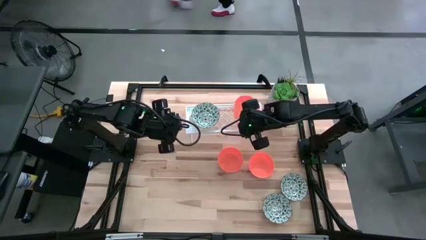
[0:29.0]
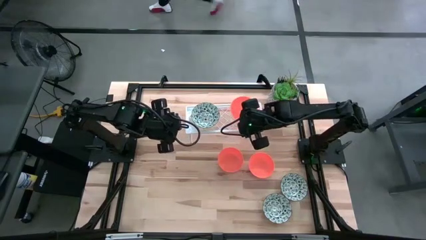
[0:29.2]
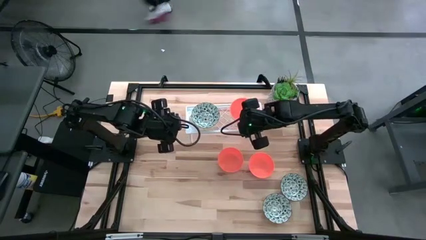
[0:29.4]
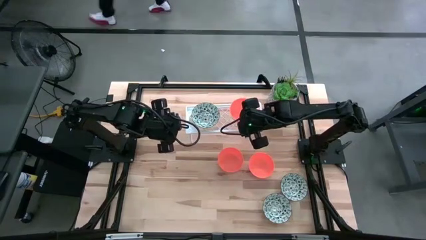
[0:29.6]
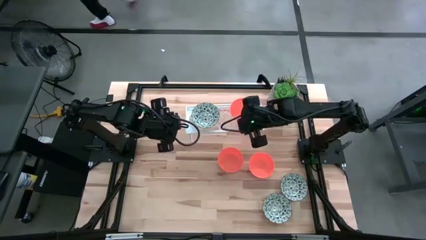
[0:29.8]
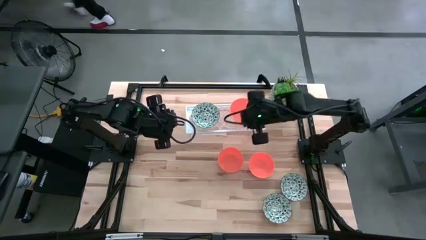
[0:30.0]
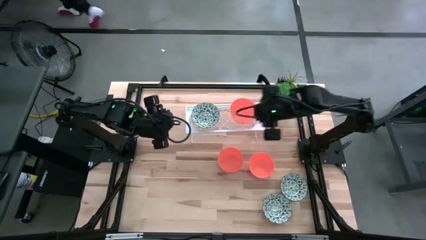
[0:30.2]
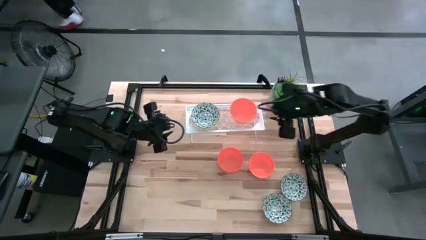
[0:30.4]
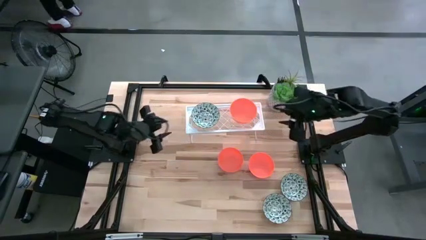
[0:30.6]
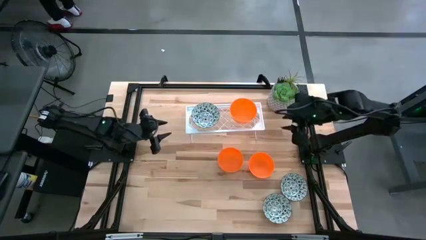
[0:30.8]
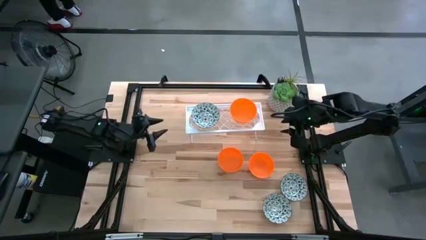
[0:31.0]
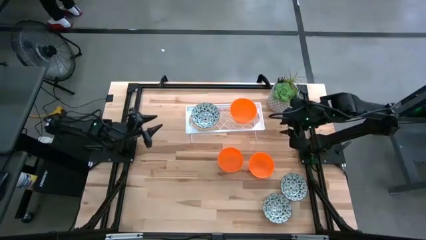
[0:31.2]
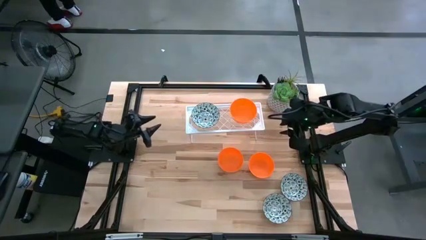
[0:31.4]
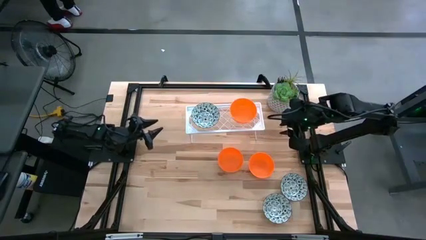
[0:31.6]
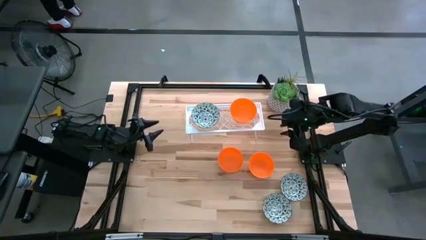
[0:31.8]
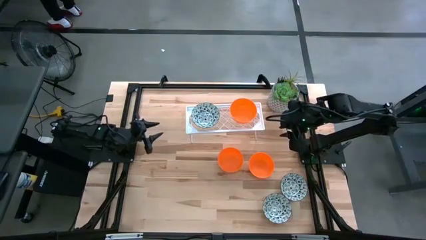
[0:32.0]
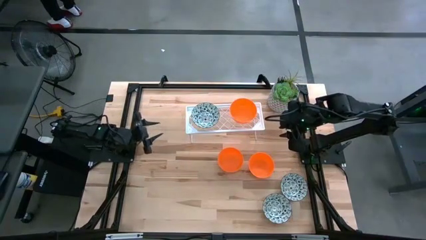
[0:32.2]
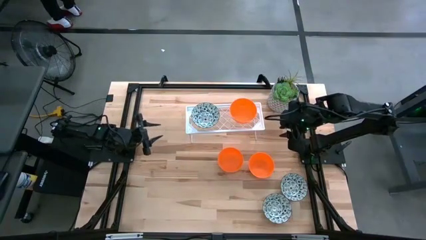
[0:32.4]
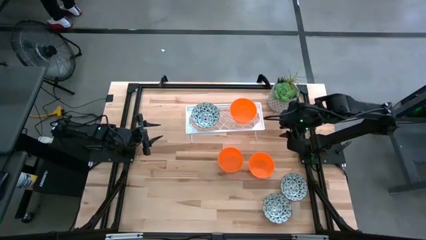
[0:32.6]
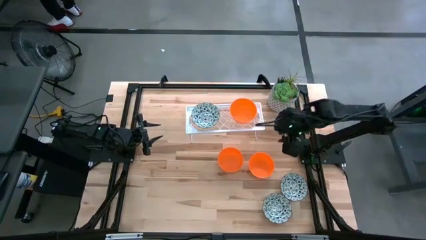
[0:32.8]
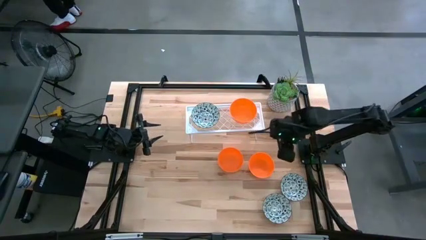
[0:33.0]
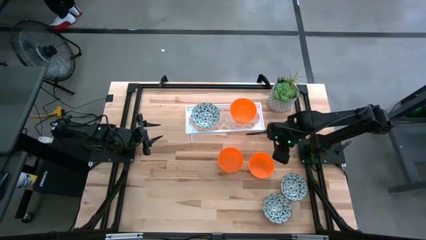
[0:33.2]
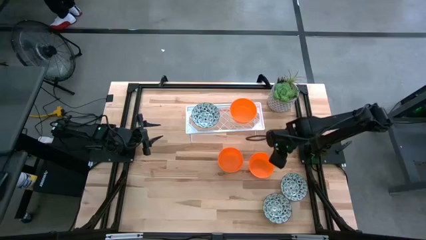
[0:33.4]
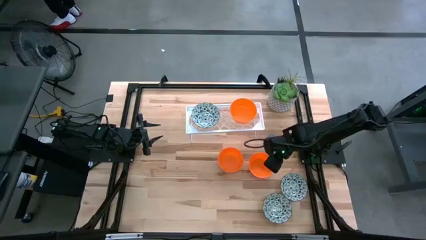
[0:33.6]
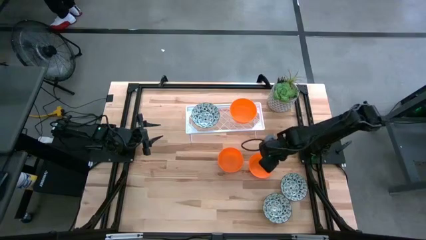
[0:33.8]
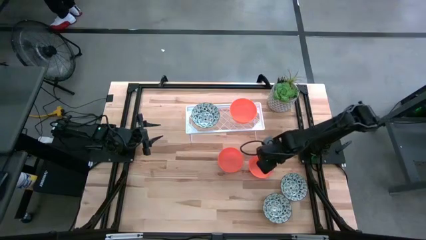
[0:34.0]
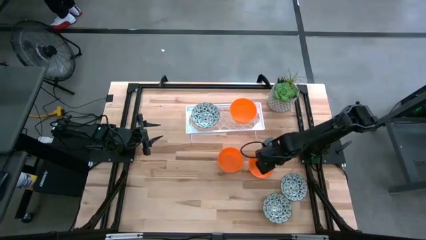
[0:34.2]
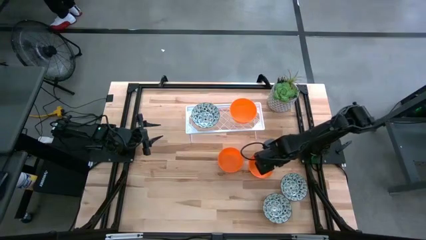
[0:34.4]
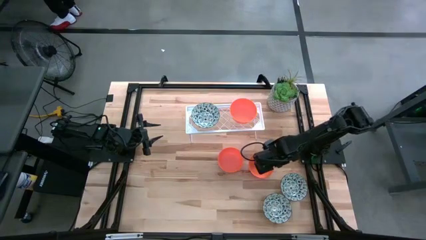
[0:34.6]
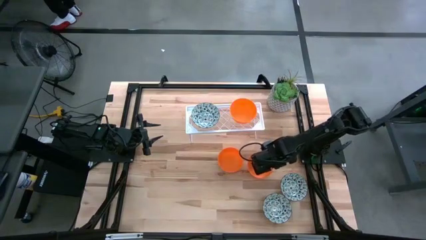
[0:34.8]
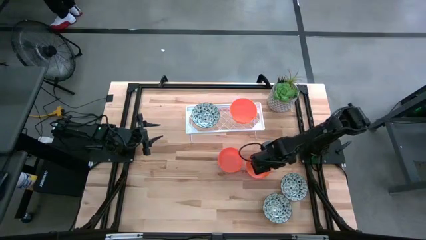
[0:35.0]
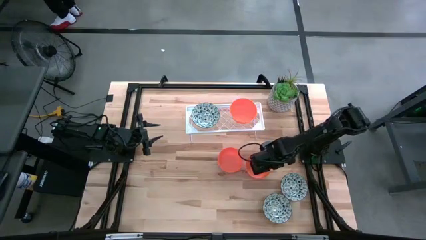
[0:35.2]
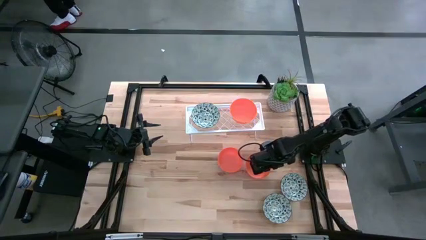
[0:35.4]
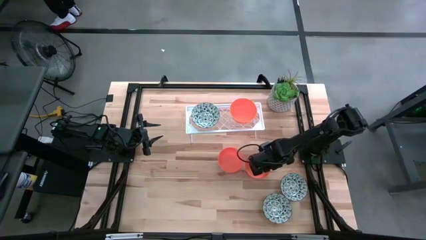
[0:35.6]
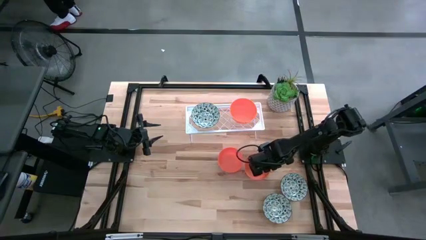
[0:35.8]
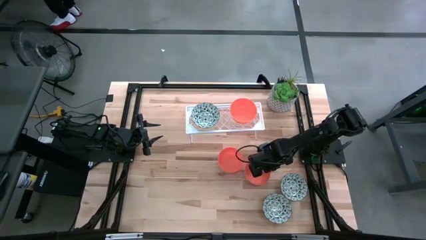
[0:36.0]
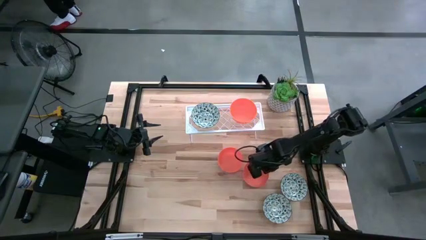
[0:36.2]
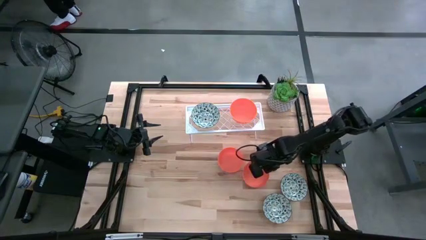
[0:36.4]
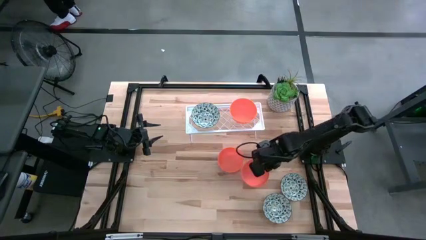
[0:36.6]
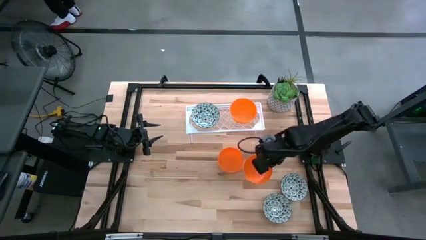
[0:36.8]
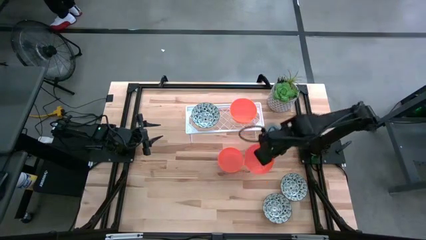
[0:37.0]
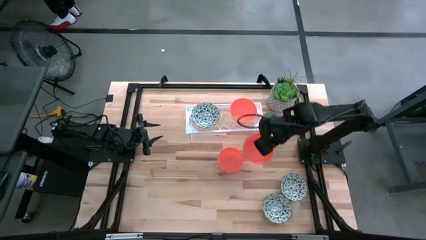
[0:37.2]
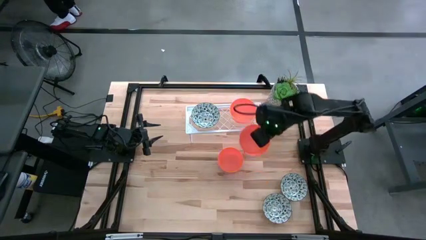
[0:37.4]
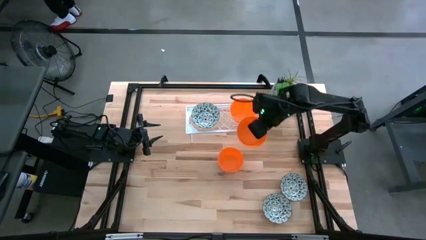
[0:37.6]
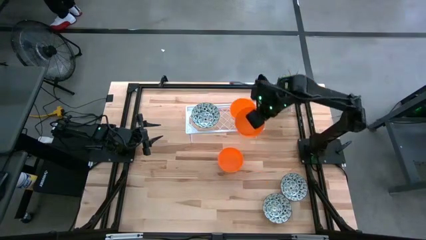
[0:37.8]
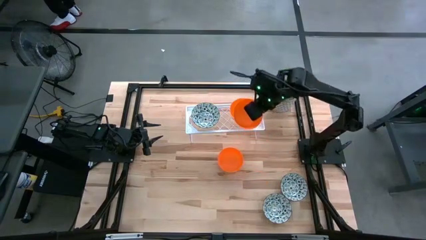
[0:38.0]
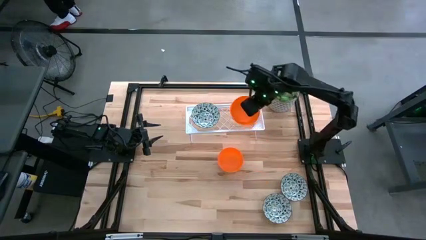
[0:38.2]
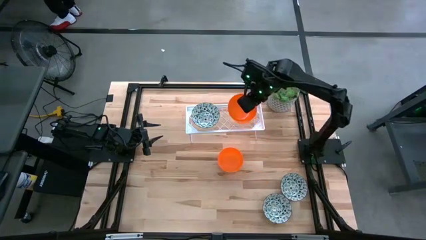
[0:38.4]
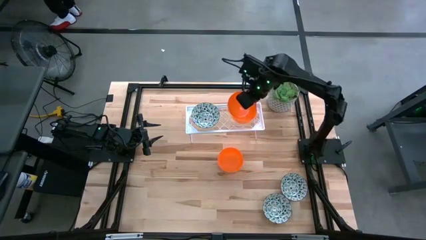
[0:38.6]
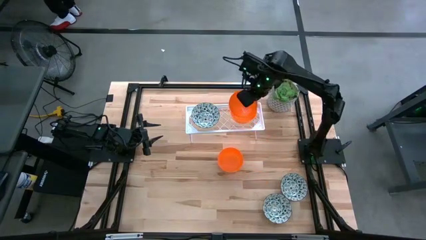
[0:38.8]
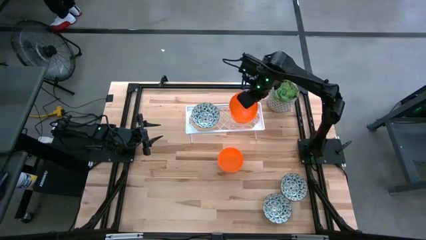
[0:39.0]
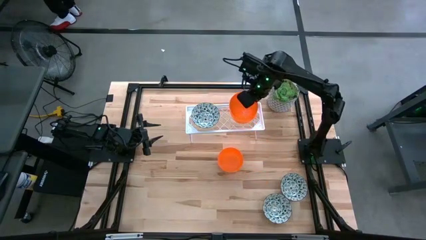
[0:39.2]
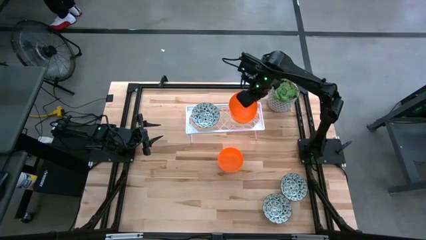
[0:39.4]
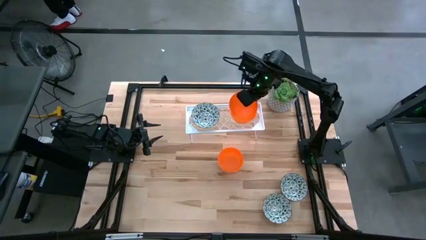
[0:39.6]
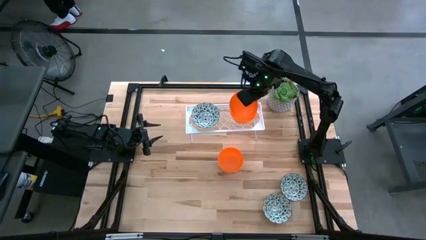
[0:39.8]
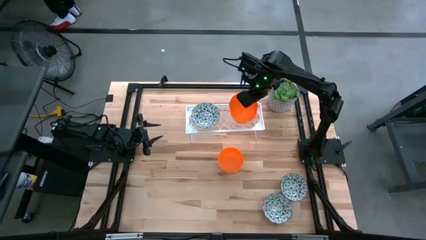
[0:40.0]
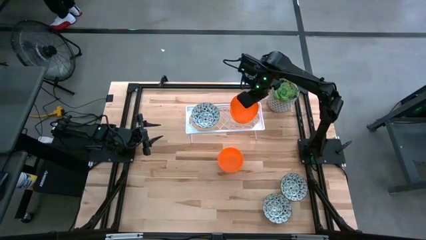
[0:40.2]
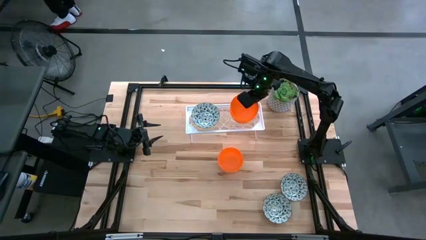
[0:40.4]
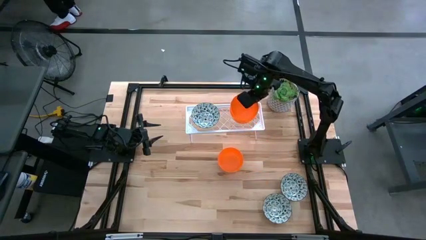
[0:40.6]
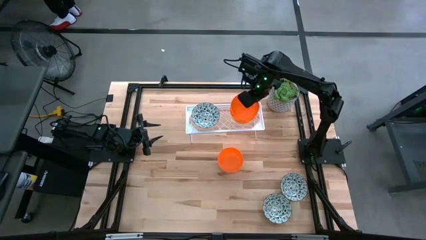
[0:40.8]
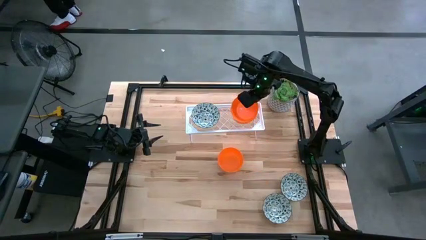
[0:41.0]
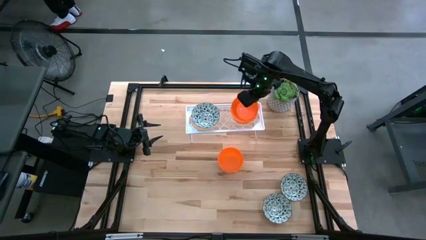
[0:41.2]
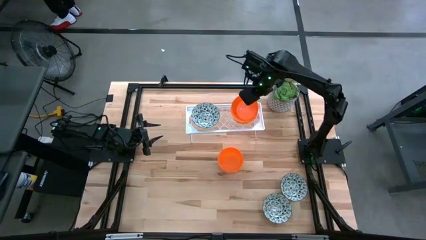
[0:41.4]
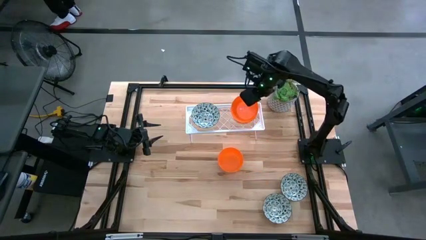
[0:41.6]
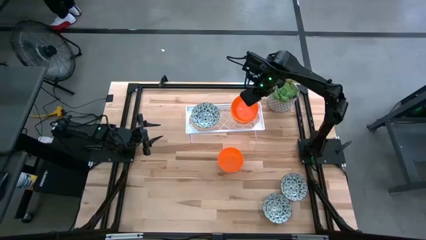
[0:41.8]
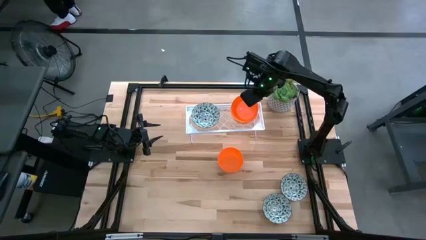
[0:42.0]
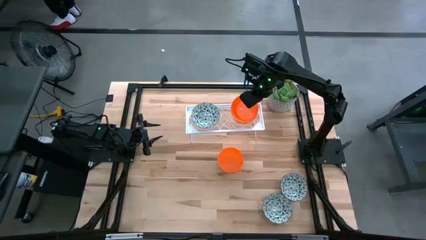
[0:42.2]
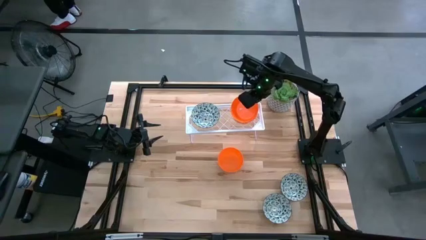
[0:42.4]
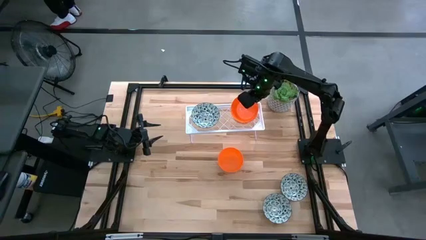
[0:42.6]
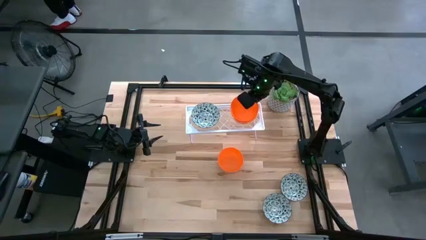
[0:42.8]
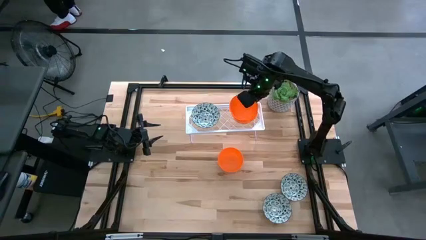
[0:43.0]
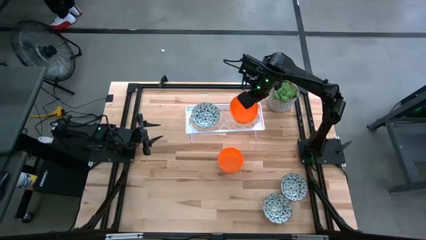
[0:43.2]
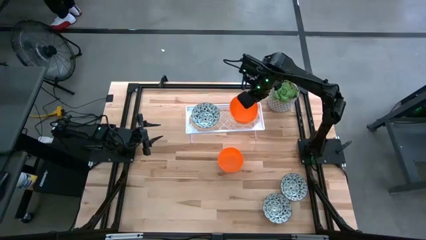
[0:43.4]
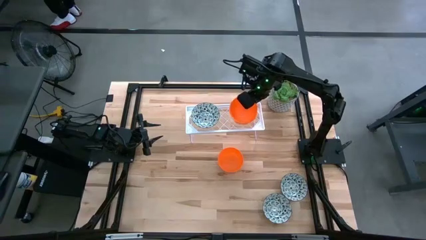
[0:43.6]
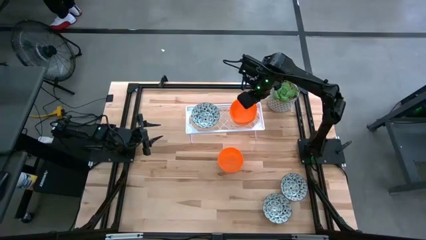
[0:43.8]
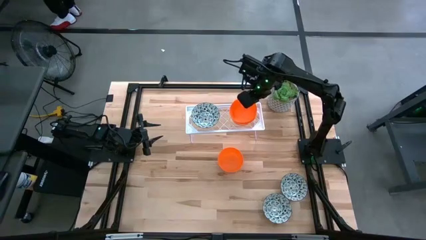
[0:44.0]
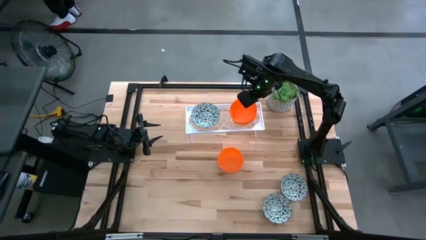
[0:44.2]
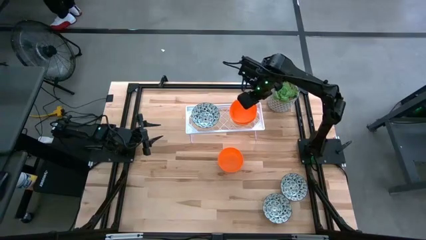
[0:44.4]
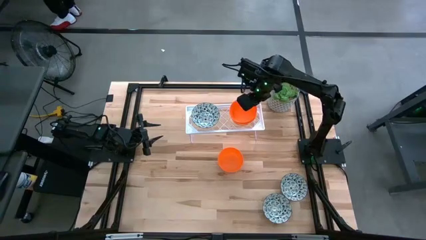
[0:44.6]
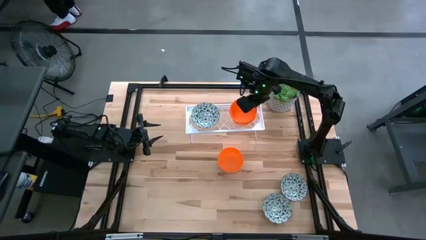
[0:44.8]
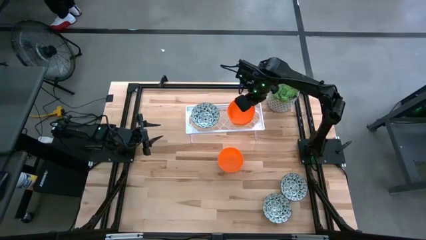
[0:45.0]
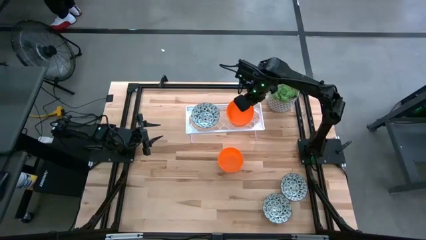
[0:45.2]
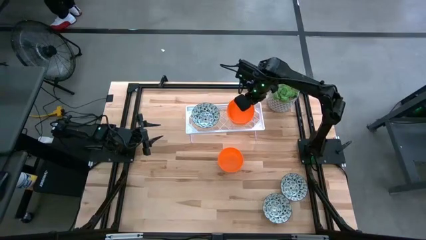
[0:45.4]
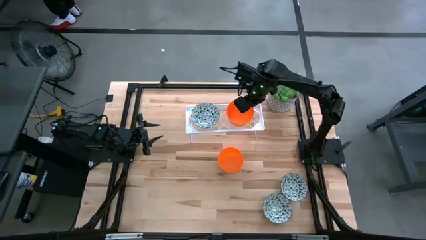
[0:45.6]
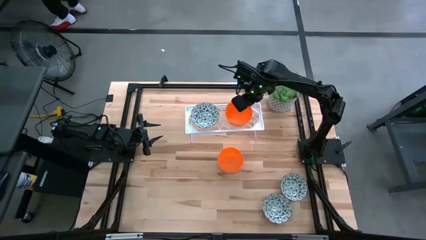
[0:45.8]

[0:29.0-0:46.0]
Task: Pick & Place Mini bowls
Stack the right orange bowl on top of the other other orange bowl on the shelf
